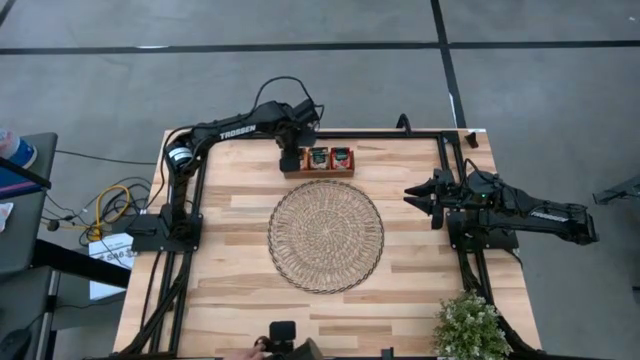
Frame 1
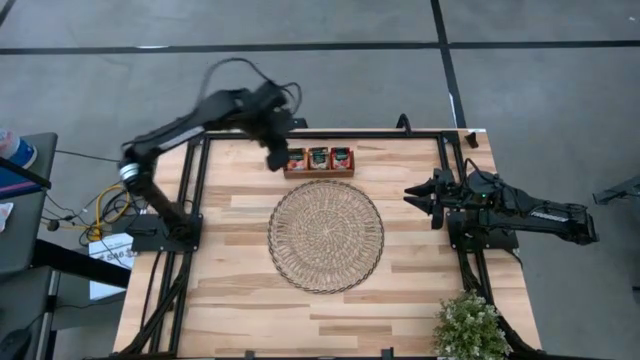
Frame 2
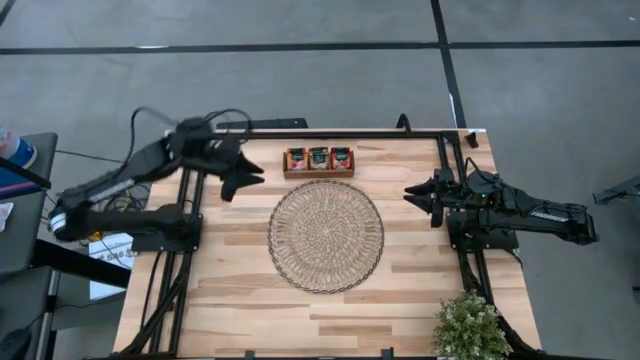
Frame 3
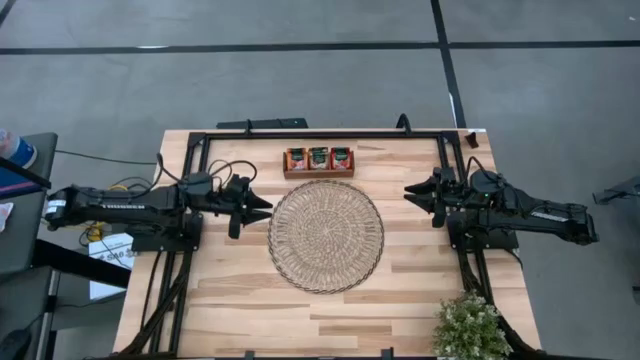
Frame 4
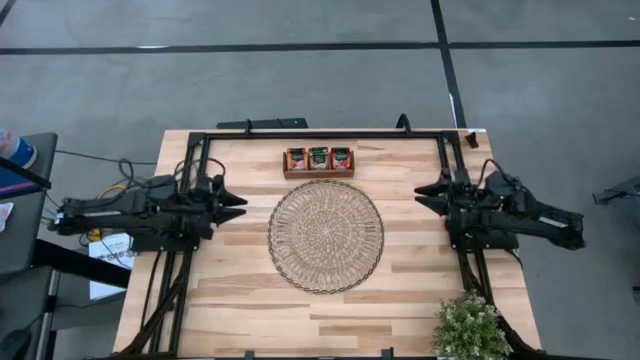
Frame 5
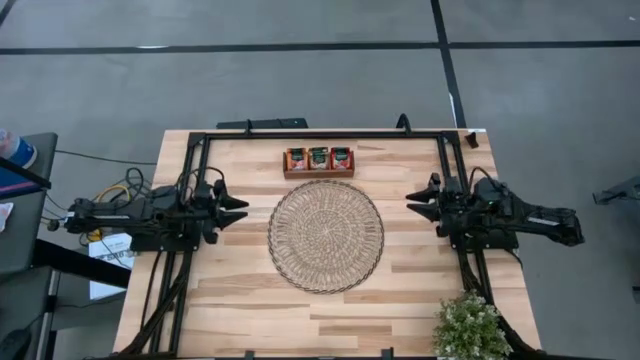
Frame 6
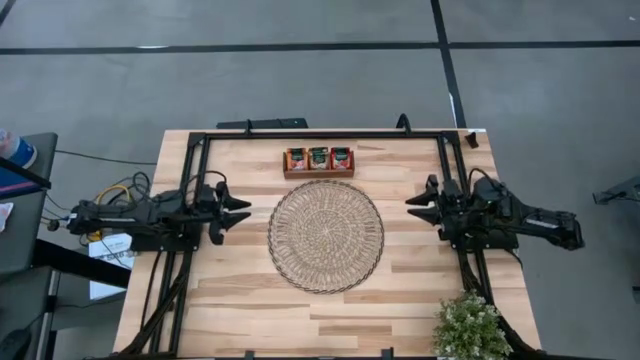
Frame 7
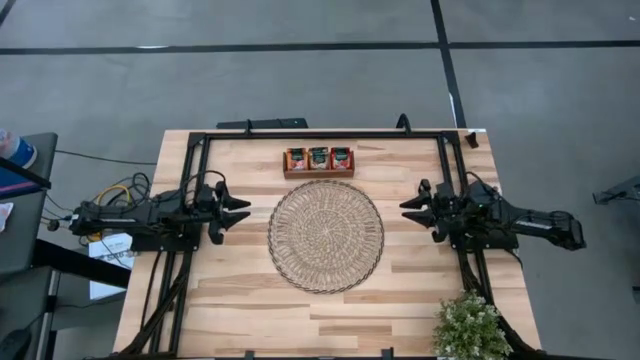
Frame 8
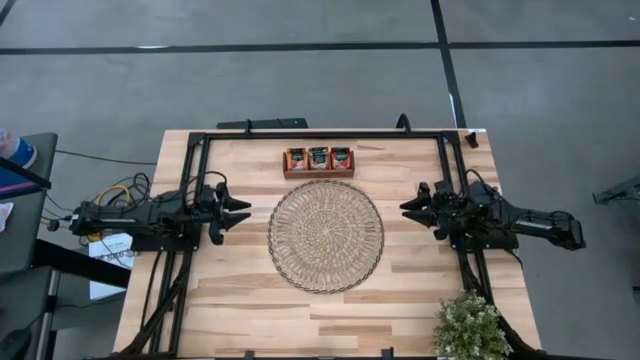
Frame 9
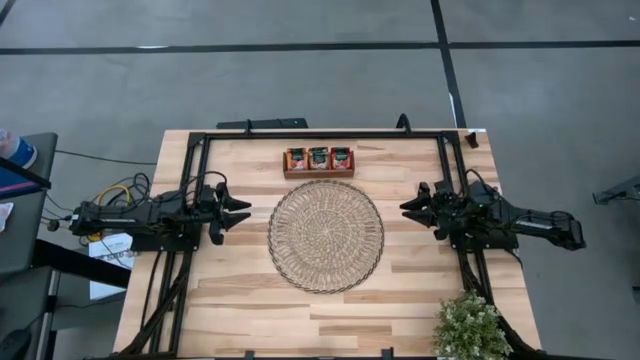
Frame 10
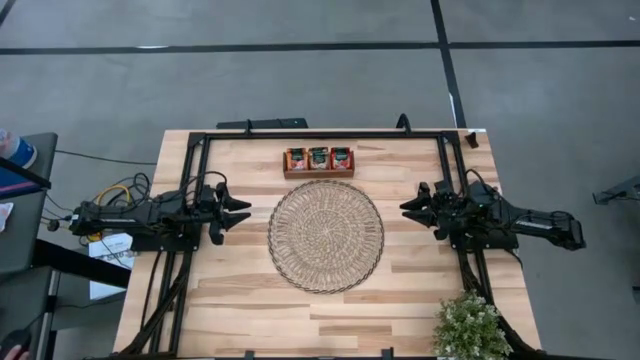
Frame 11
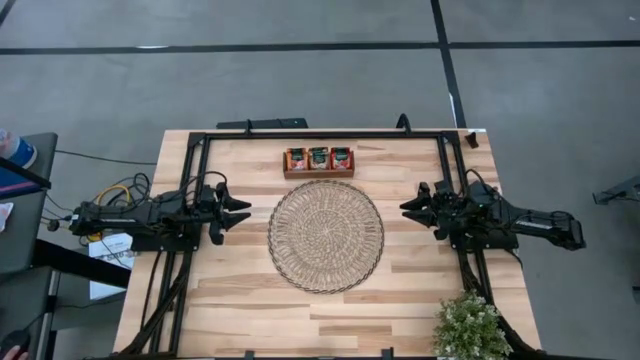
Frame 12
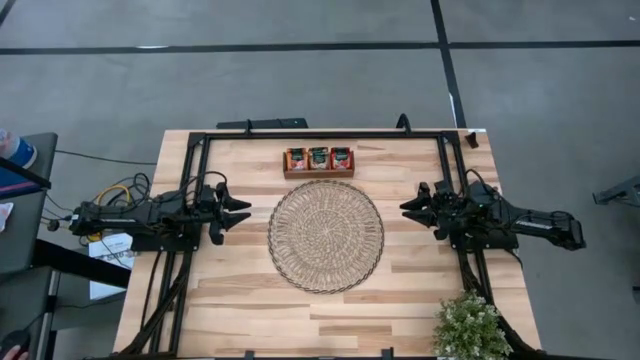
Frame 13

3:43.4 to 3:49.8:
Task: Pick & Place Tea
Return to Home Position

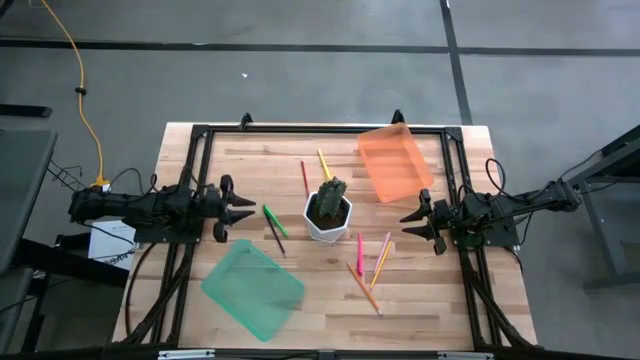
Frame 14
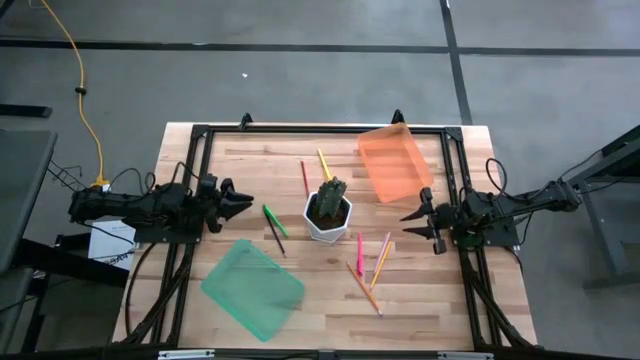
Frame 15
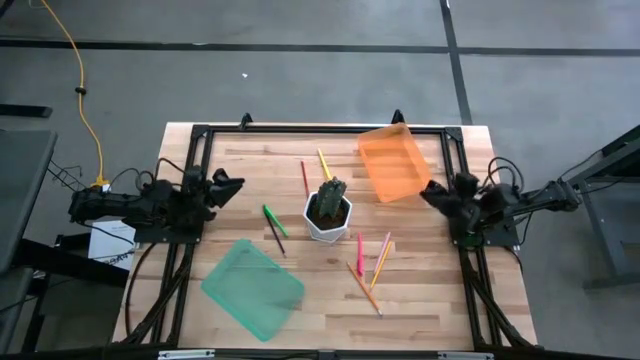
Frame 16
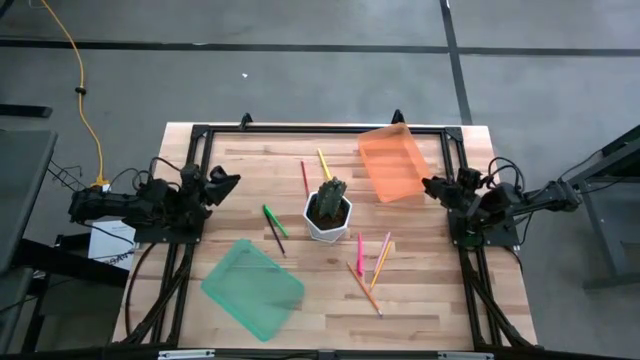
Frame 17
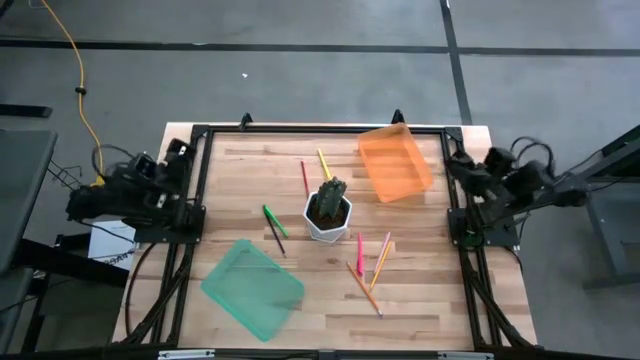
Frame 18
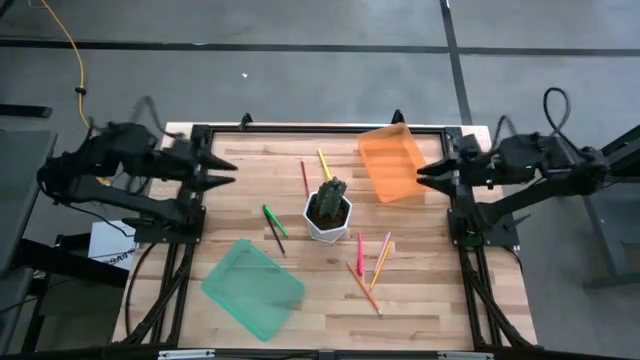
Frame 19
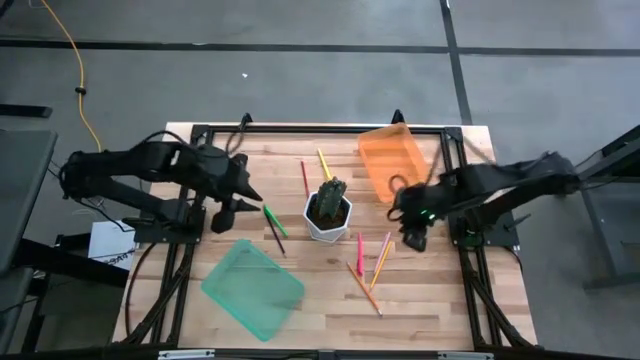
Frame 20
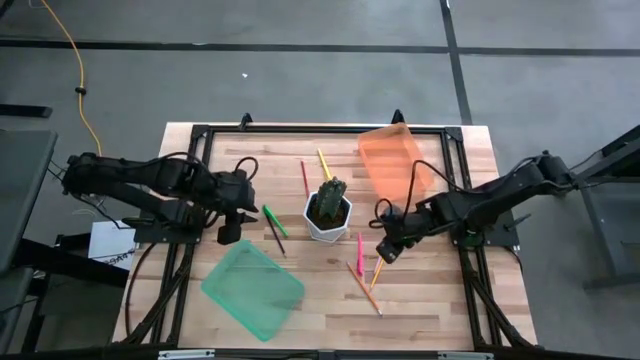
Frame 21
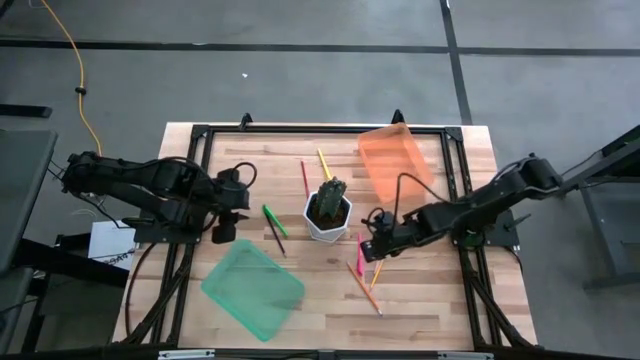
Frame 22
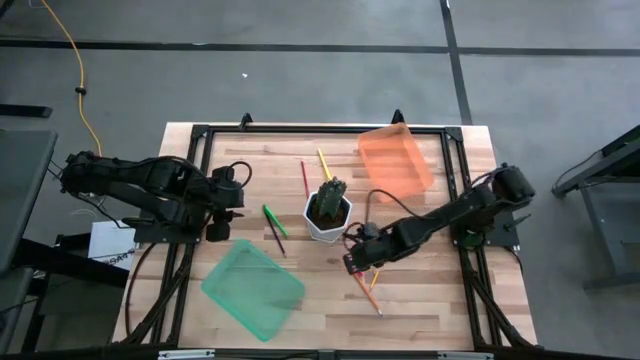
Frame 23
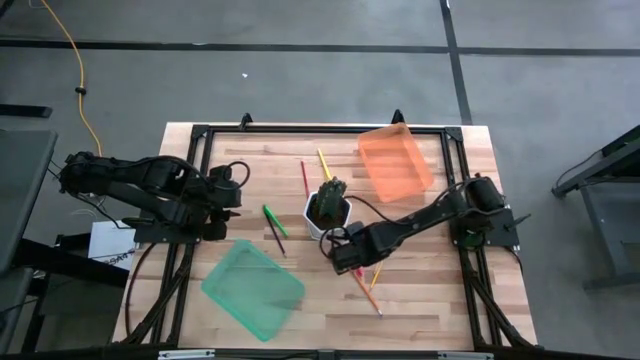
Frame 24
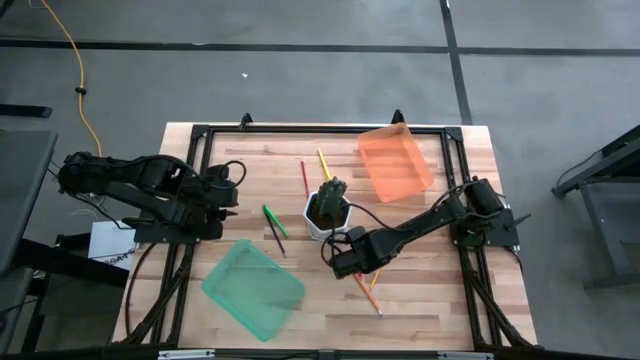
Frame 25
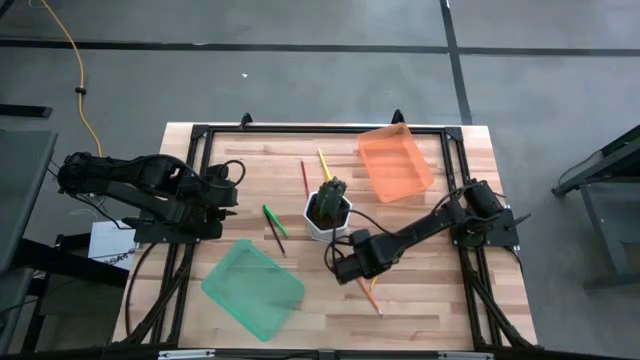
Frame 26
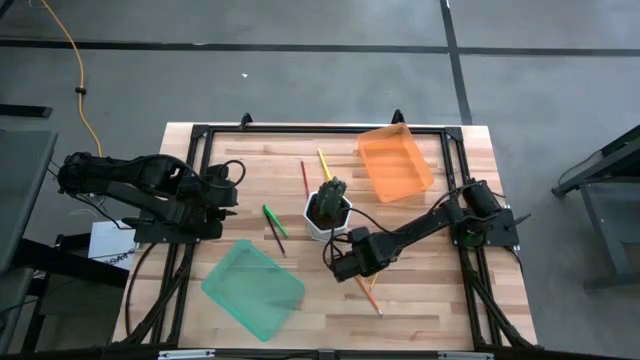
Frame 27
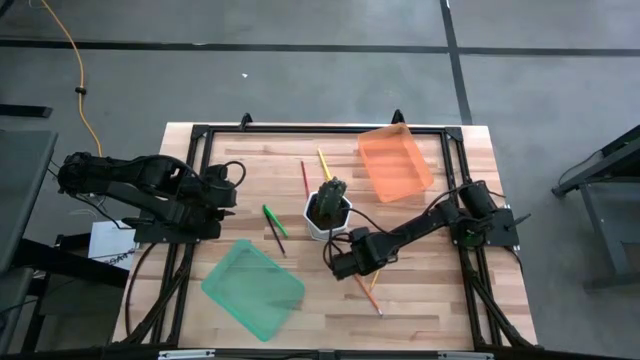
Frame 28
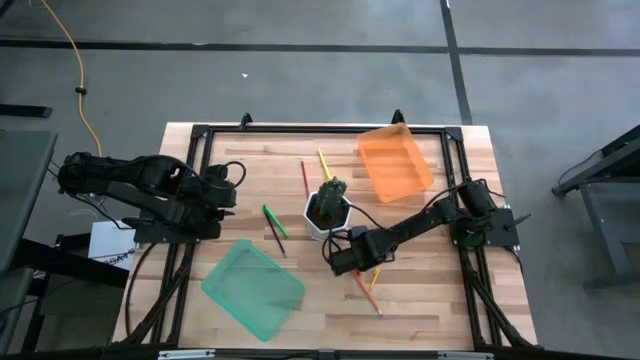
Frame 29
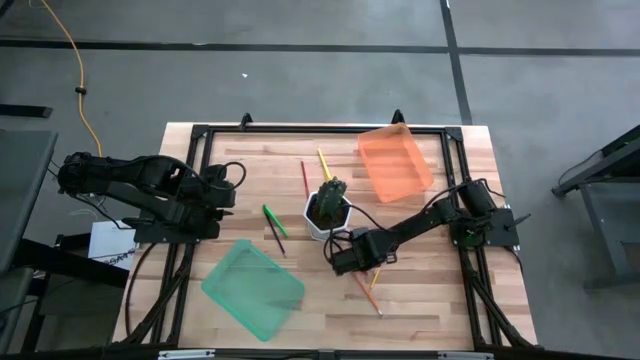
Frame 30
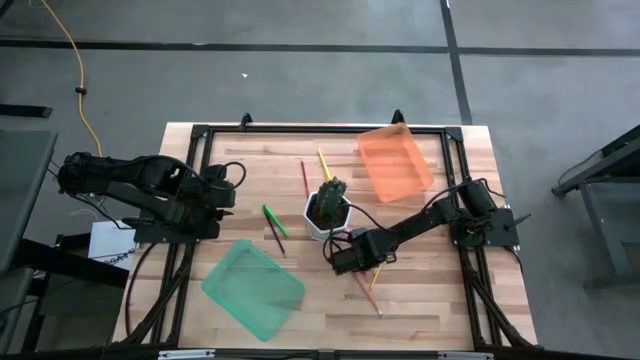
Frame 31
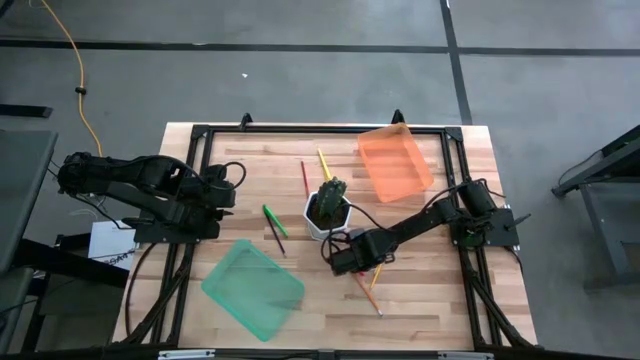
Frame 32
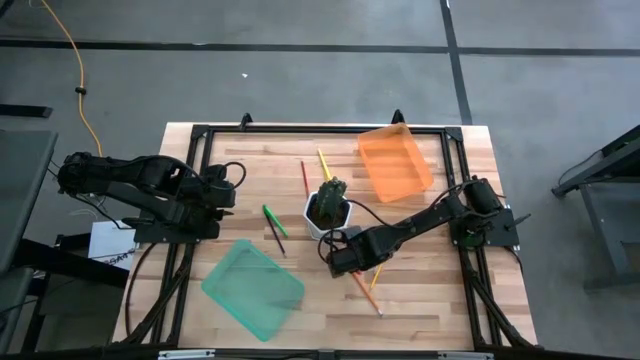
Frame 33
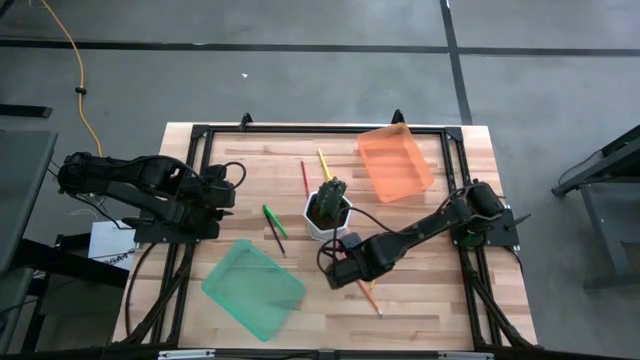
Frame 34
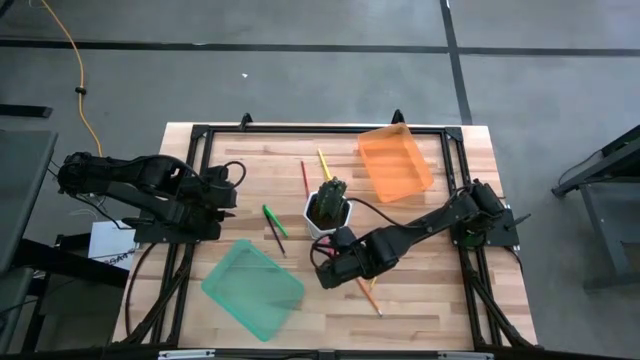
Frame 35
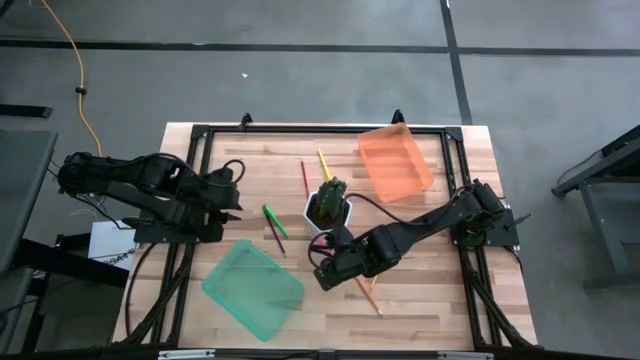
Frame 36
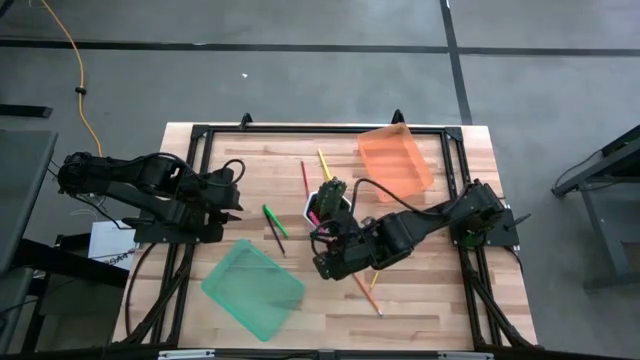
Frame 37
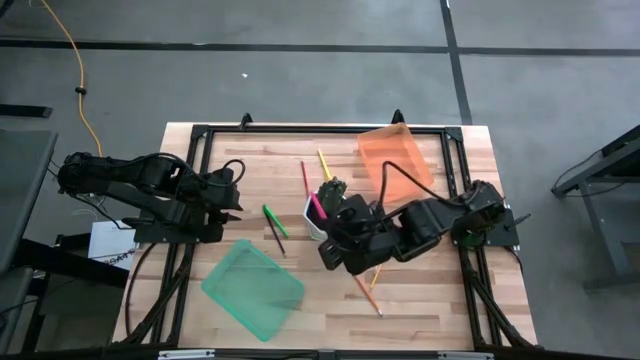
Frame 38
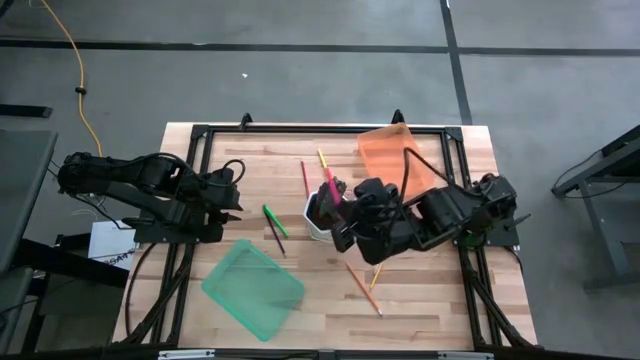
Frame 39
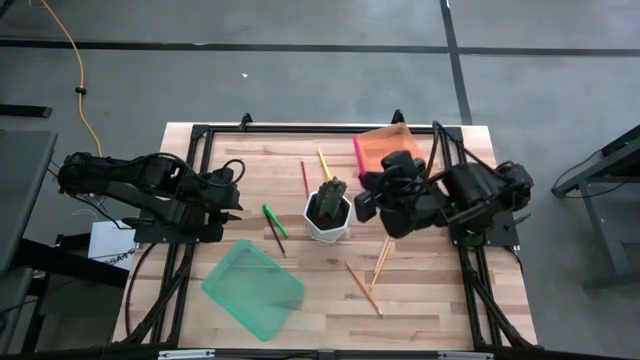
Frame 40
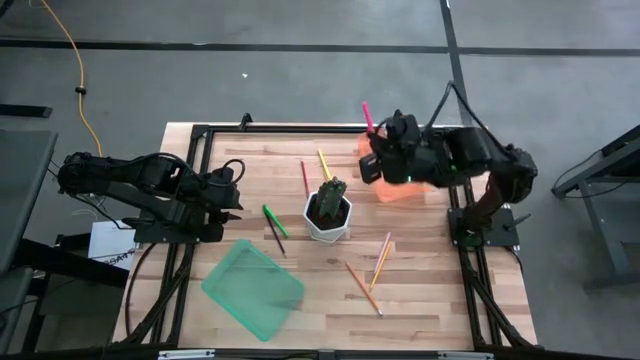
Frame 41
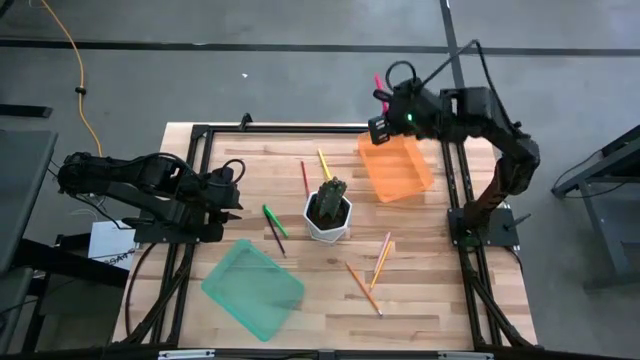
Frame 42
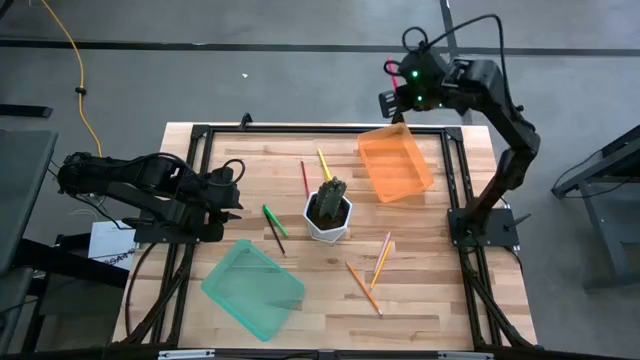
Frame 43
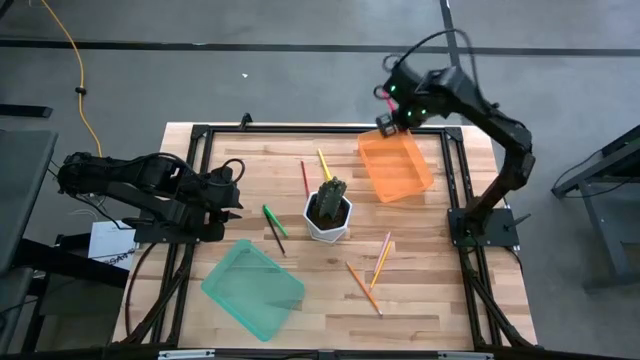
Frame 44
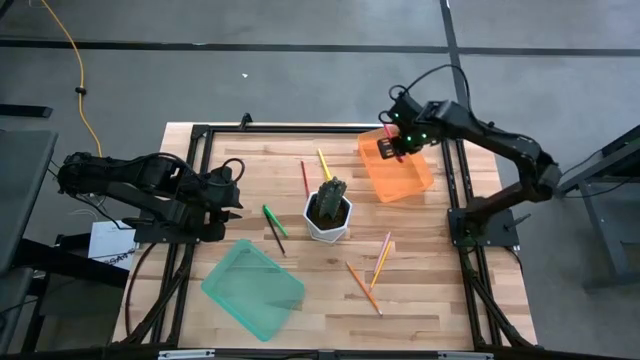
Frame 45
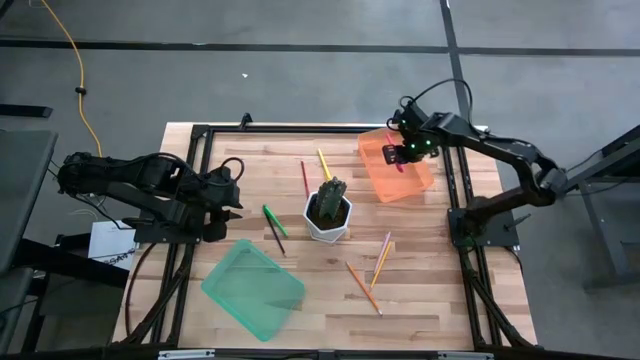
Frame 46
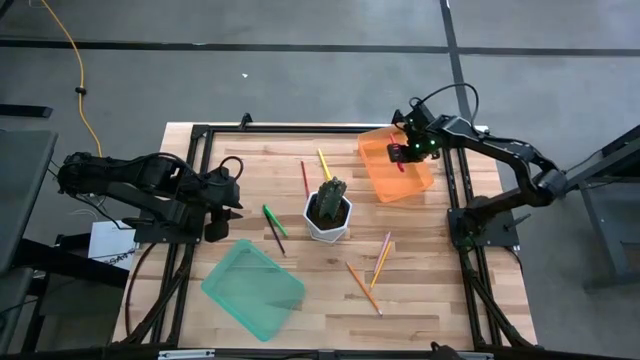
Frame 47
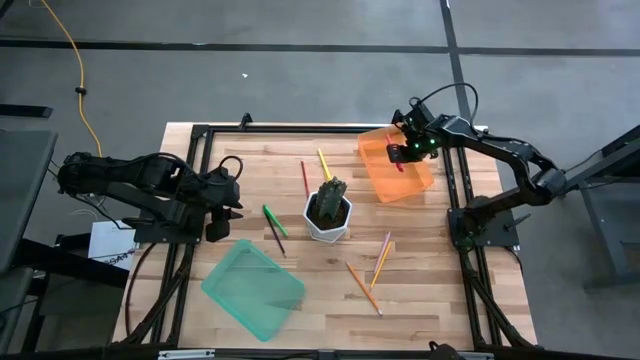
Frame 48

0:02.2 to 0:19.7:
Task: Sort pens & pencils
Put the pink pen into the orange bin
